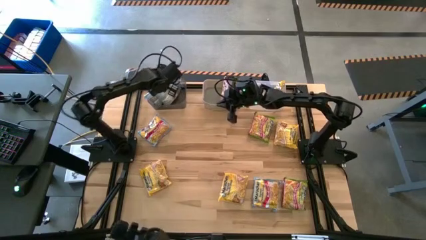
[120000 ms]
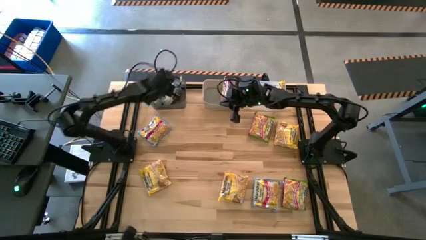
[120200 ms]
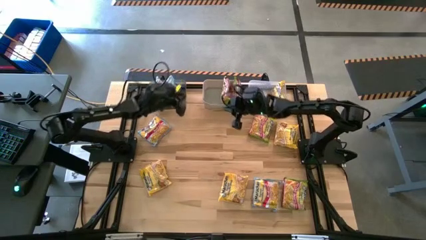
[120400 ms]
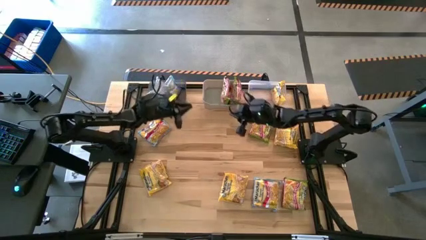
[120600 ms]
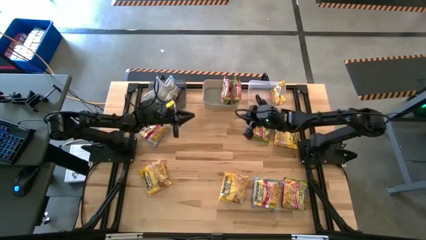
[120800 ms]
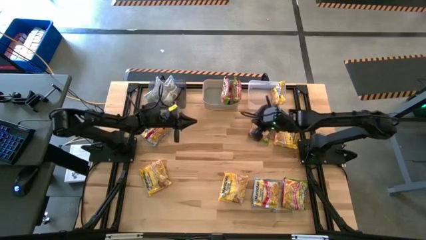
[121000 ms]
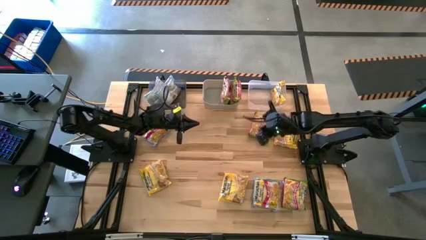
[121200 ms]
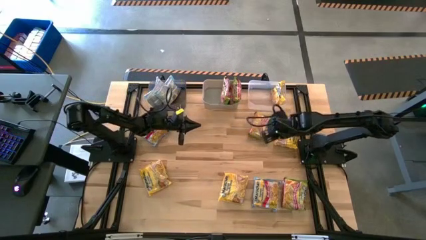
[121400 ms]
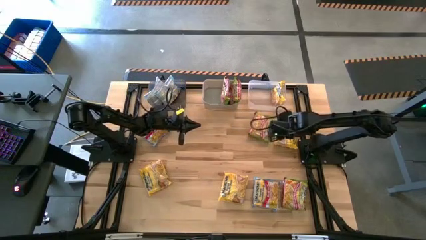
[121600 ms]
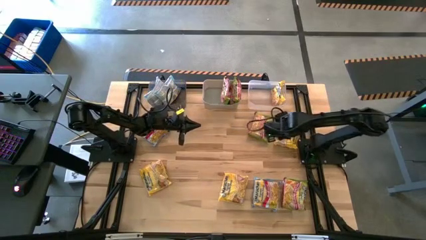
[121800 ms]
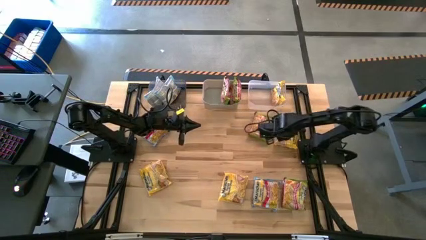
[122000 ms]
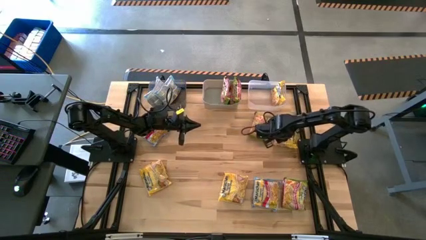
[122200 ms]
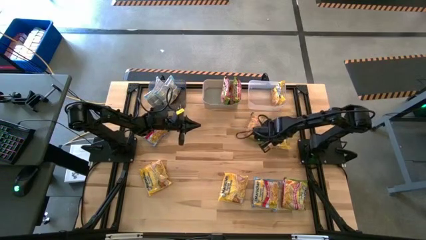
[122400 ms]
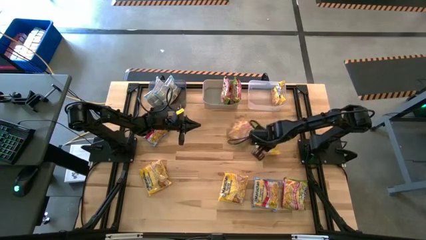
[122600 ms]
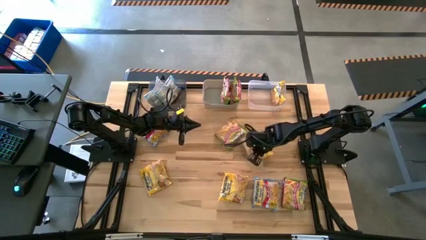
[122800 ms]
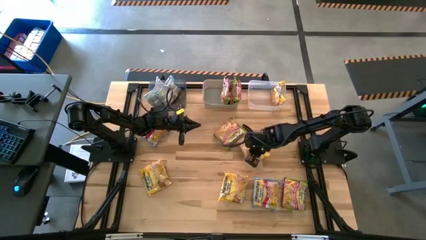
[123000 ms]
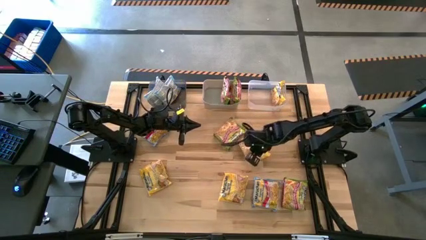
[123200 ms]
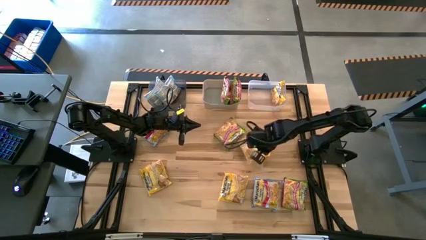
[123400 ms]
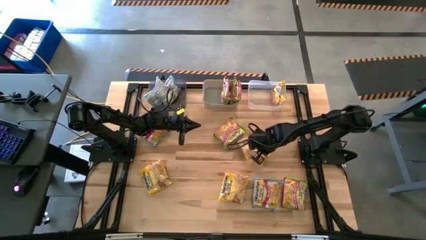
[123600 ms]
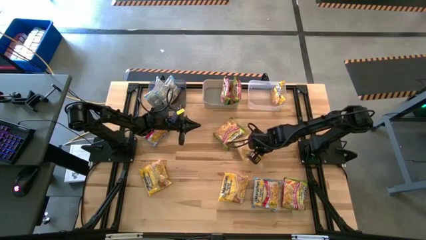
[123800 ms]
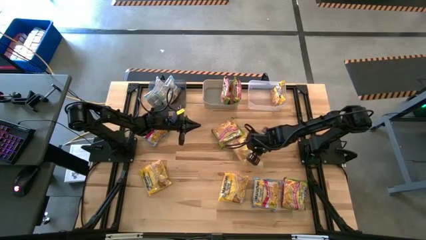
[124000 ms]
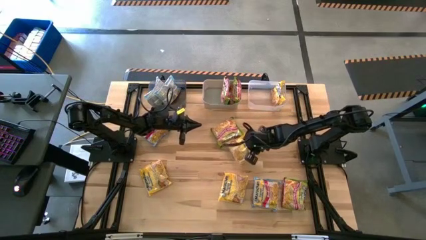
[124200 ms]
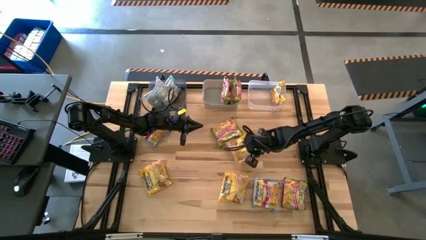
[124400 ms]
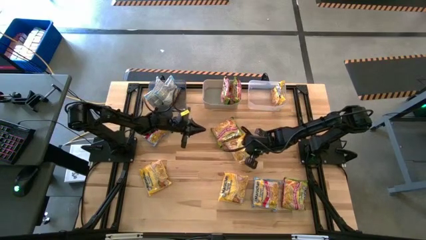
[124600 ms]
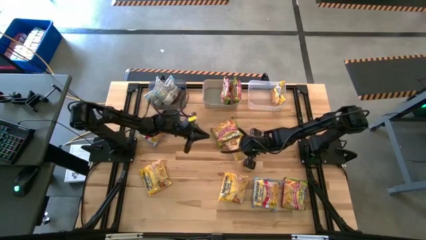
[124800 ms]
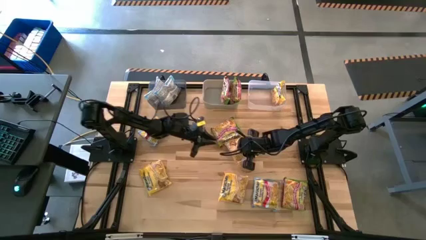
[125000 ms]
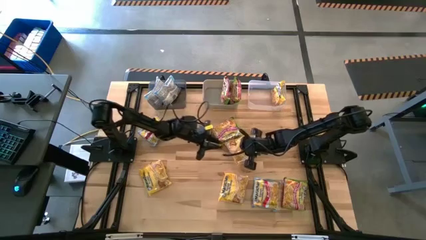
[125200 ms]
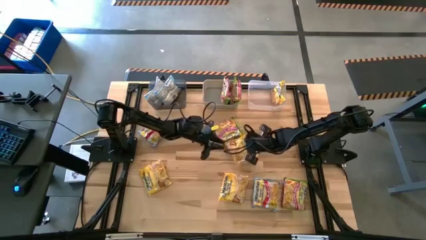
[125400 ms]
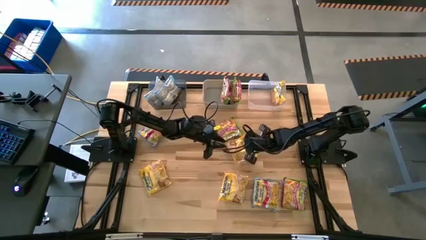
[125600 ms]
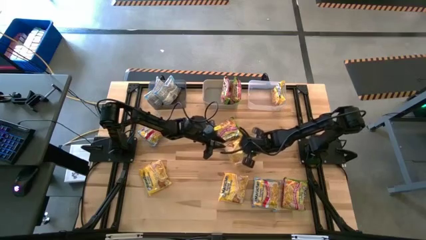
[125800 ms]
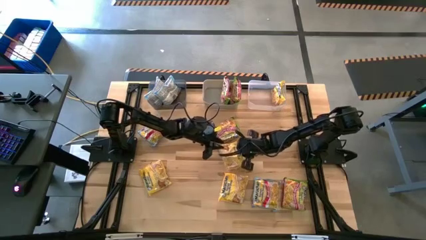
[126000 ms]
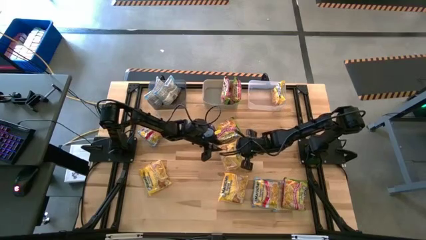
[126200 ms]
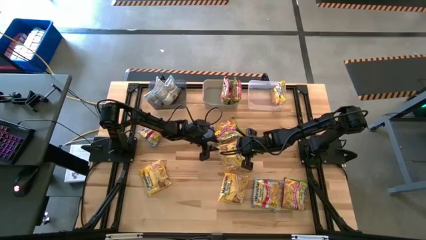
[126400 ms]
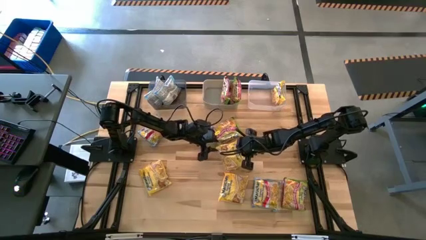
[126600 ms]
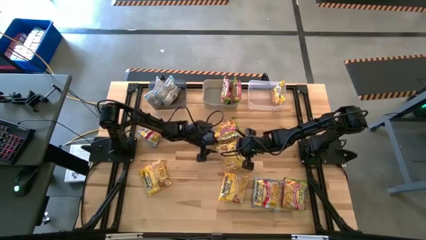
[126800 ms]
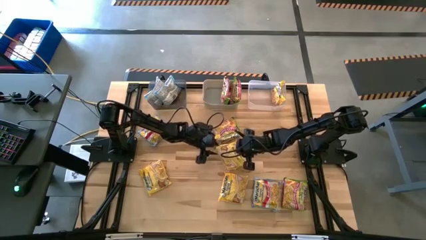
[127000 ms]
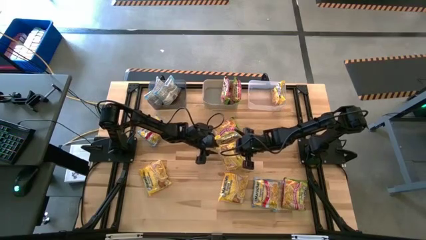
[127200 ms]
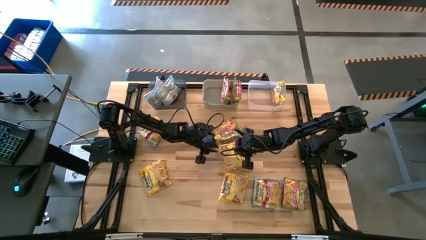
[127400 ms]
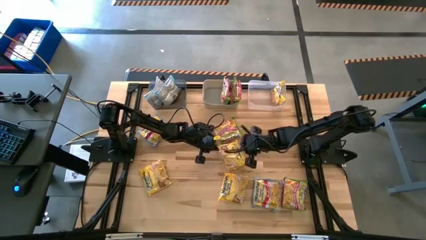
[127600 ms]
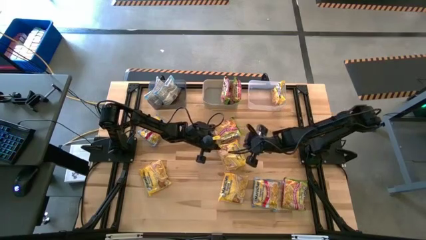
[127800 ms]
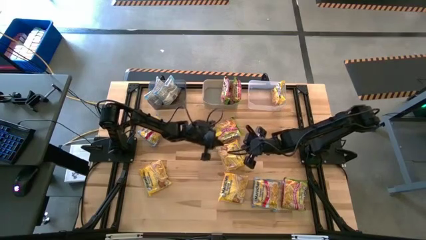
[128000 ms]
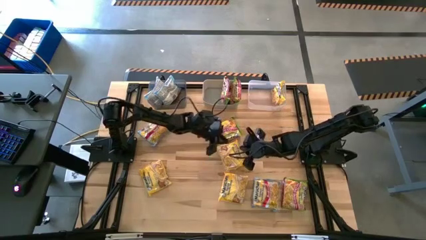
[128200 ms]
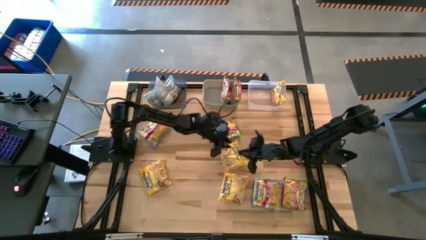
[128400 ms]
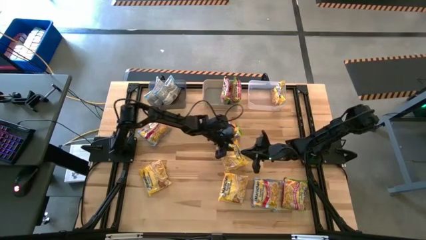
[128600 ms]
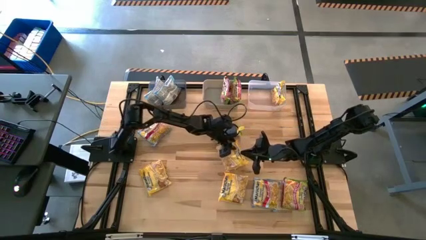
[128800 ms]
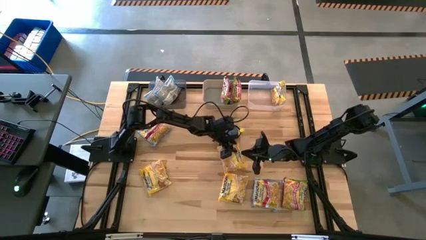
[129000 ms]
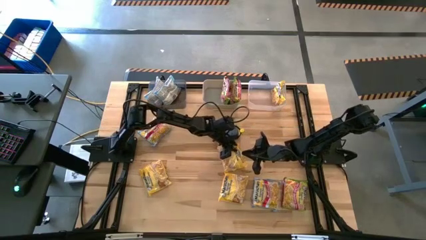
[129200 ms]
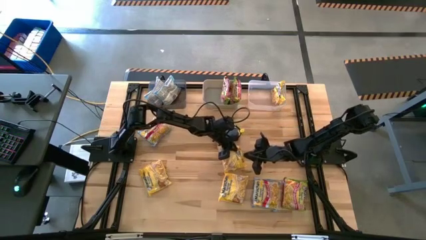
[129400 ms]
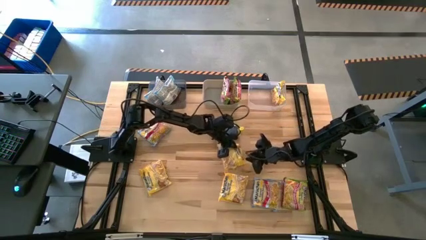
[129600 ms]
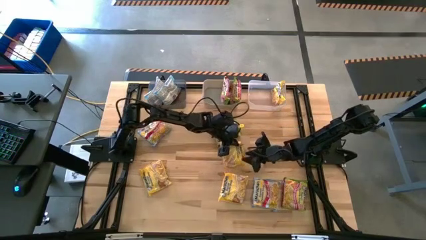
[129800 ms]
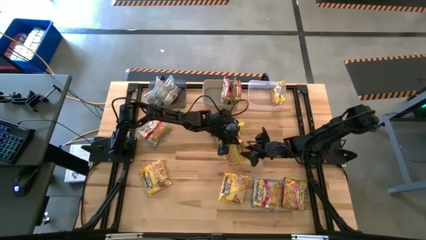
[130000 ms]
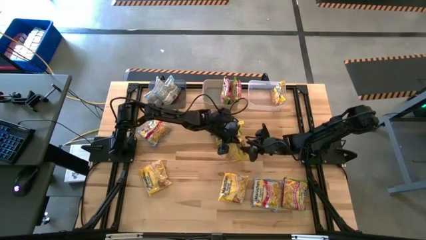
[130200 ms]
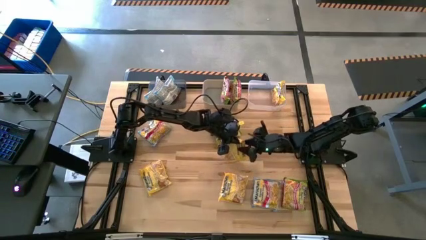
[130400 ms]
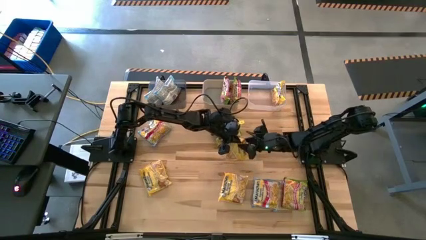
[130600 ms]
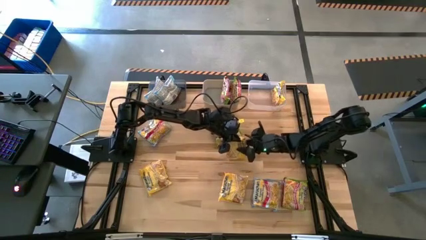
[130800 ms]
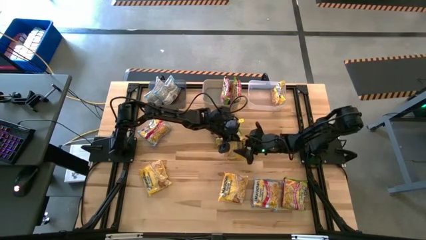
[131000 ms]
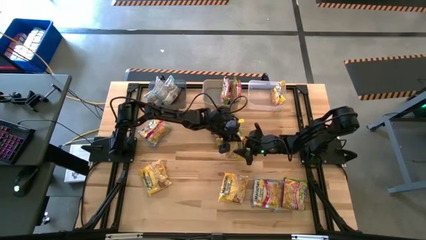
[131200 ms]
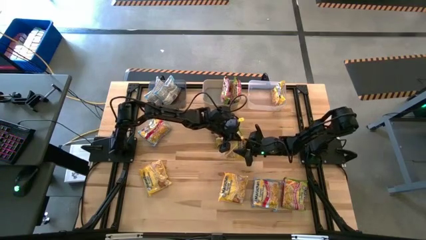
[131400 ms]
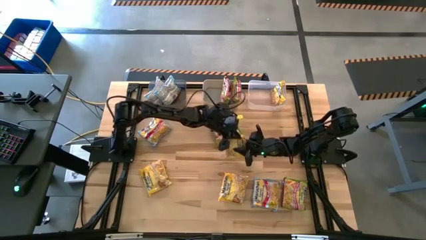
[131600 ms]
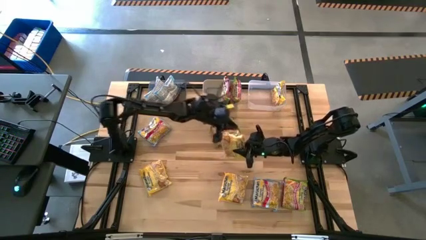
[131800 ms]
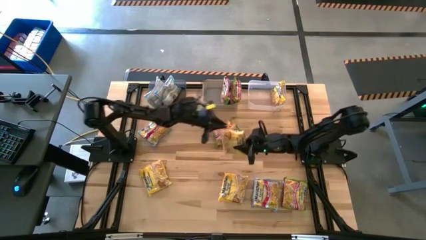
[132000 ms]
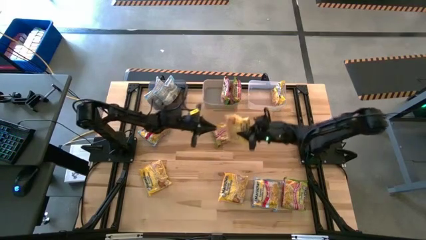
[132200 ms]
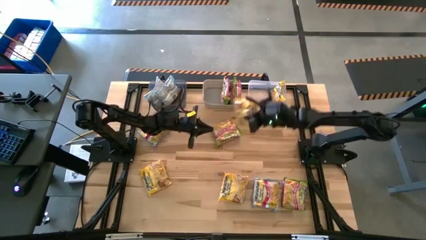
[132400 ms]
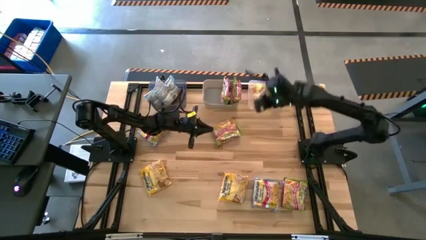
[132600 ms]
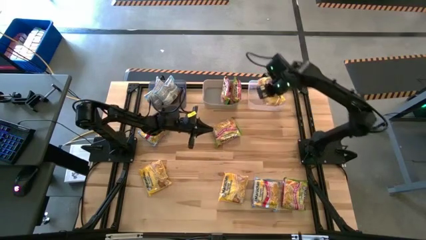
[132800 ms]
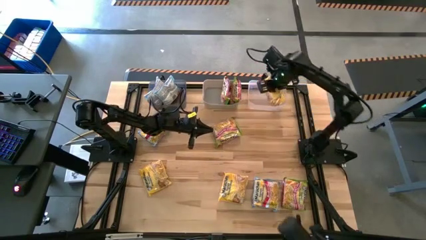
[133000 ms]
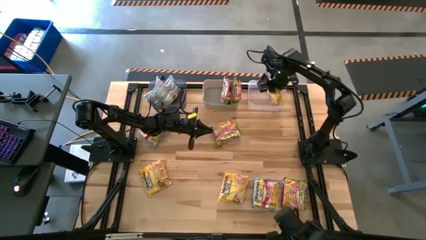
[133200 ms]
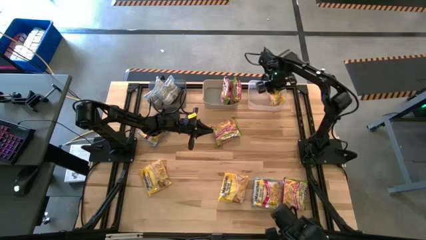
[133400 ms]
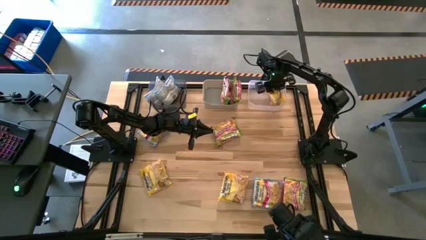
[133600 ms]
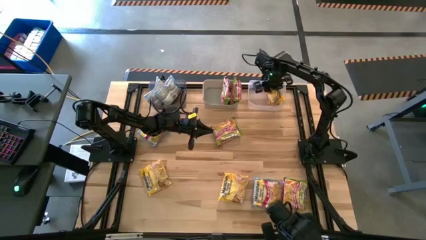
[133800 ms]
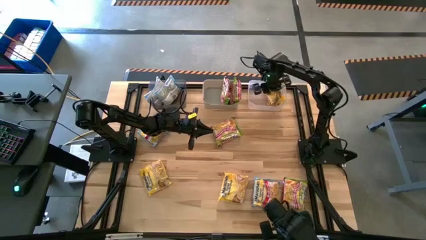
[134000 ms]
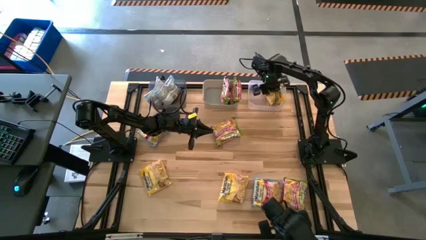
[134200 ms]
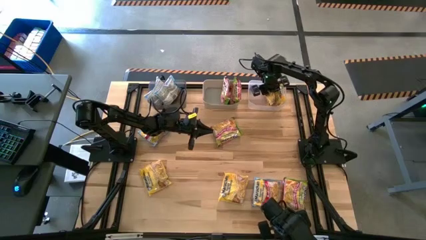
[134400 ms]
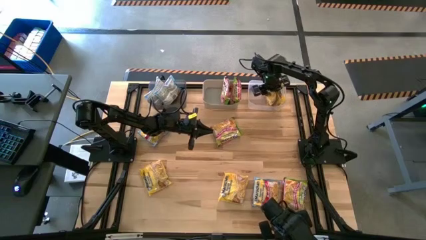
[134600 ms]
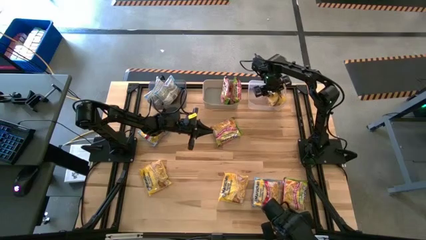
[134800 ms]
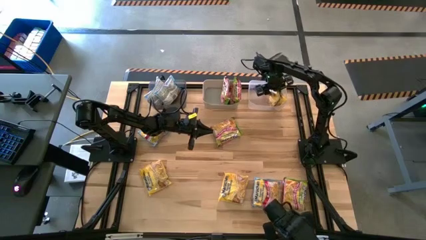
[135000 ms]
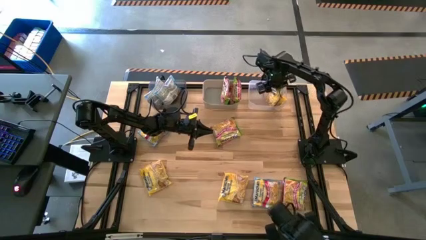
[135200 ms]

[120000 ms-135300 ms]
Task: Sort Maruchan noodles
Put the top yellow noodle pack into the transparent bin

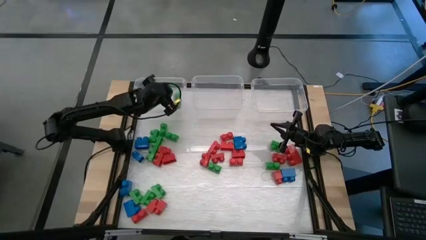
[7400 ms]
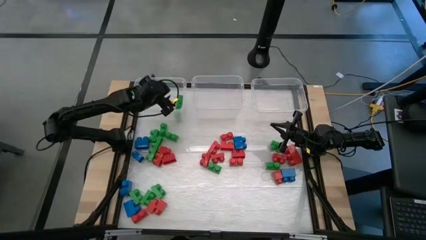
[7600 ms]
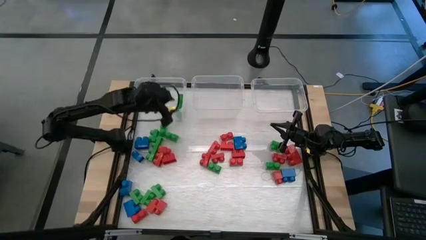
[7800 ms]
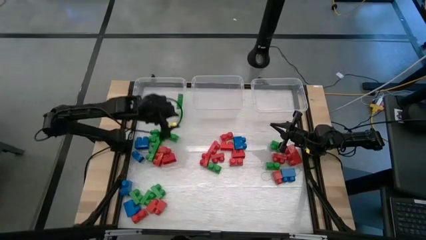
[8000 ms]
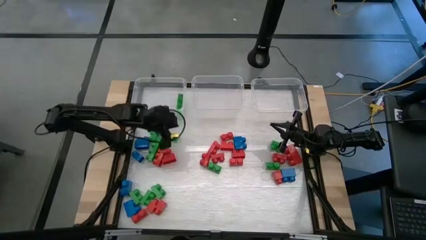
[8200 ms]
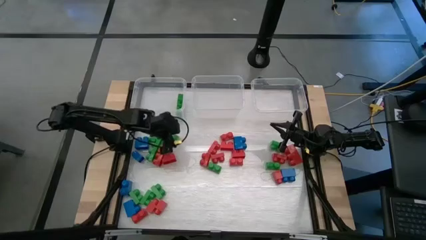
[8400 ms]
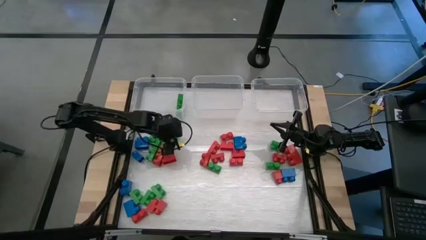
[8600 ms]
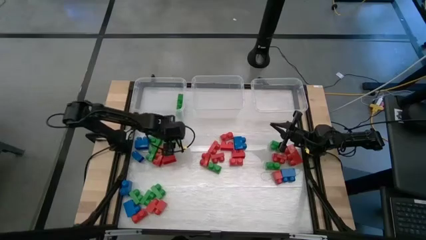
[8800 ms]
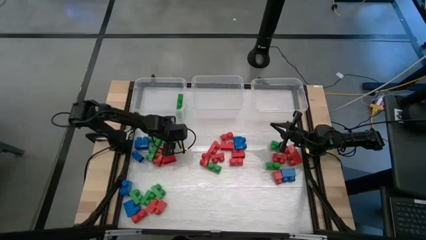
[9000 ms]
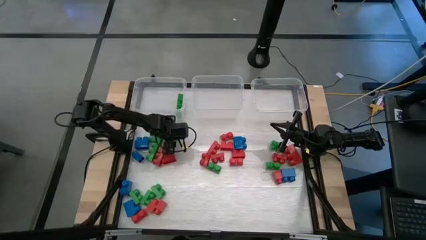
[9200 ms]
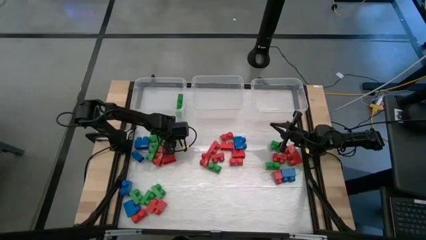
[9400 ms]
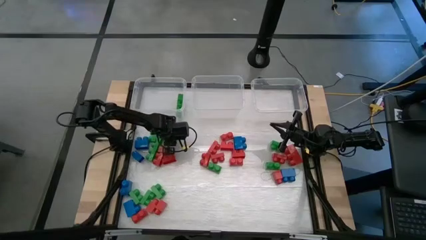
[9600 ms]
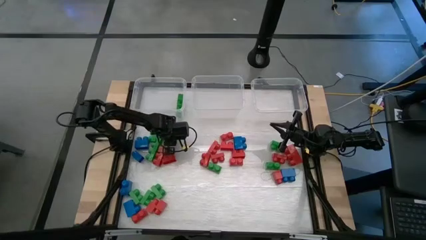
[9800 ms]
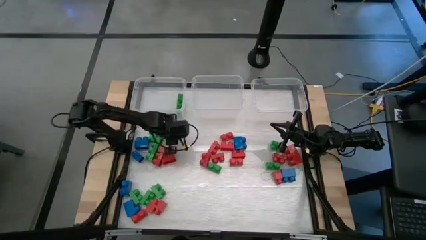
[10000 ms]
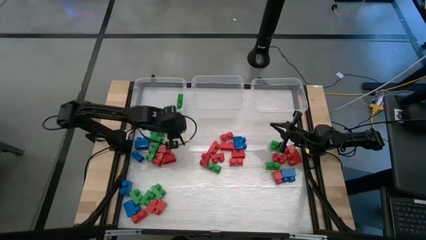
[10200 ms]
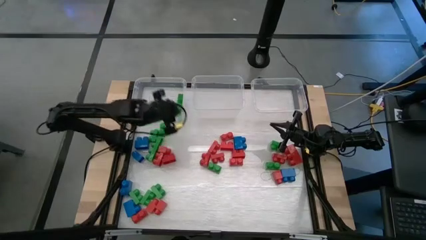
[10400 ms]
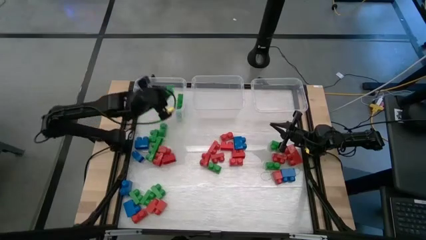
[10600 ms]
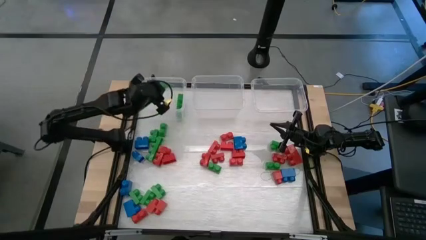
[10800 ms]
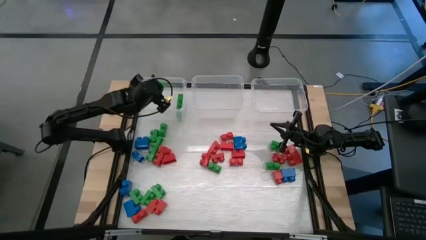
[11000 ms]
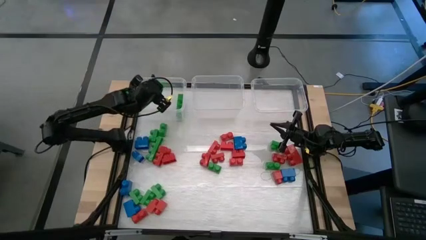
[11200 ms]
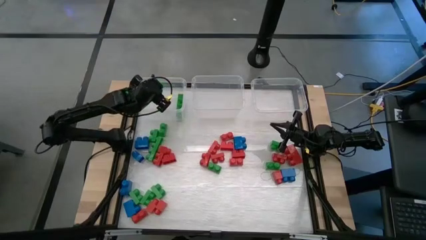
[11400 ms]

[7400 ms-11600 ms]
Task: Sort blocks
Put the green game piece into the left transparent bin
